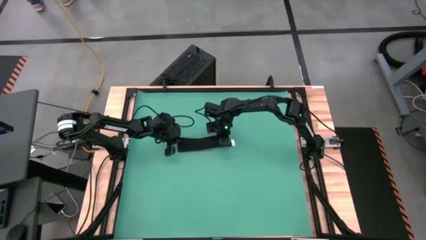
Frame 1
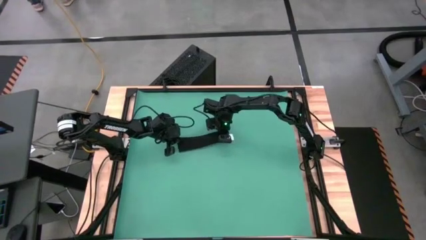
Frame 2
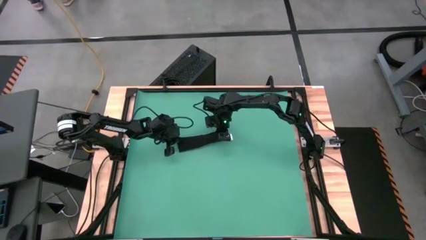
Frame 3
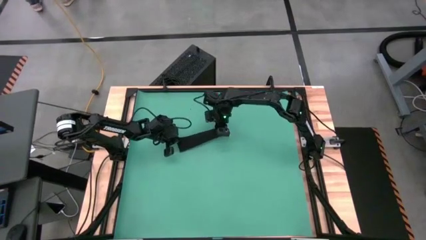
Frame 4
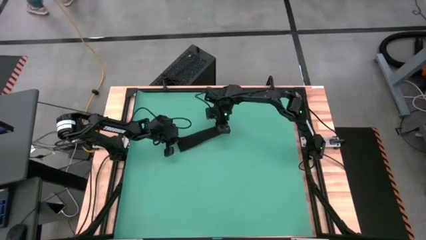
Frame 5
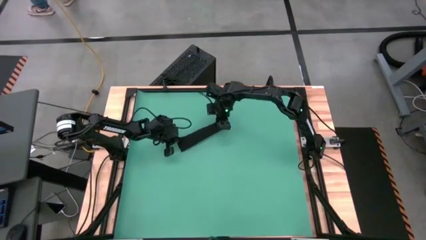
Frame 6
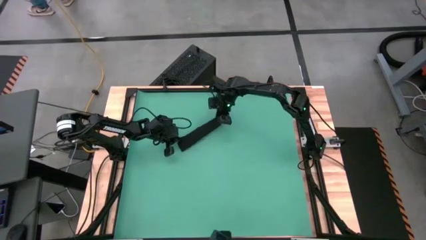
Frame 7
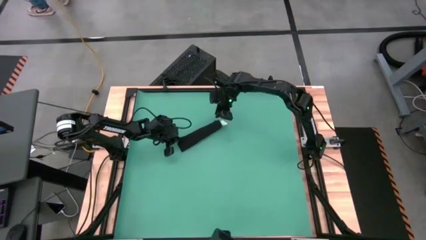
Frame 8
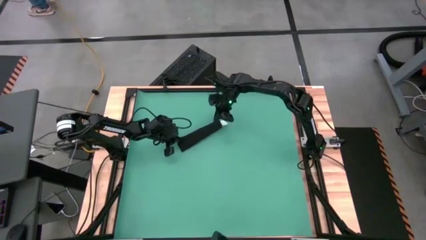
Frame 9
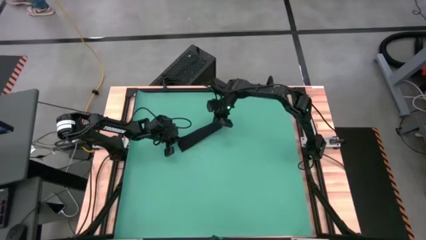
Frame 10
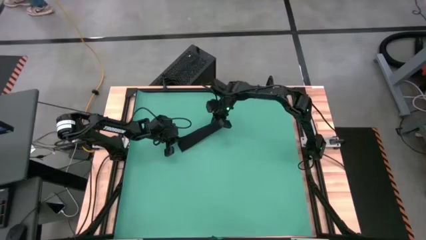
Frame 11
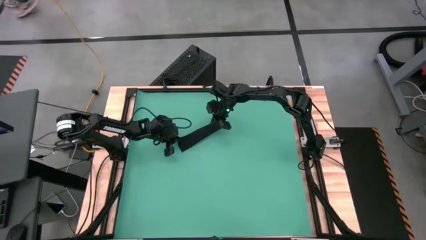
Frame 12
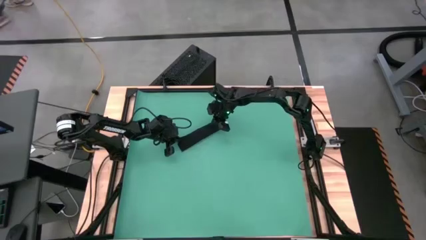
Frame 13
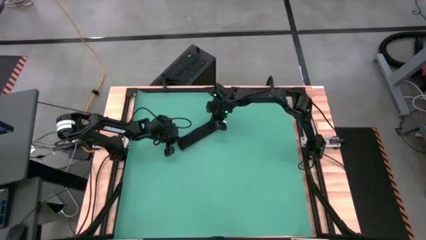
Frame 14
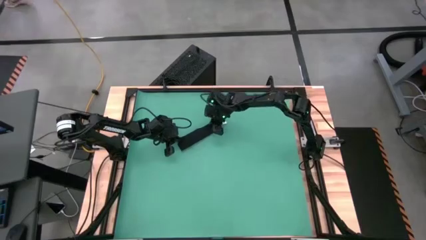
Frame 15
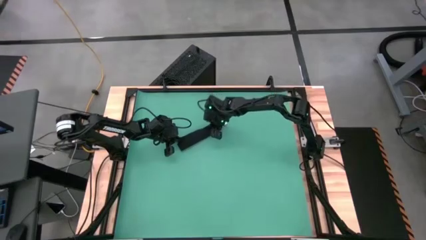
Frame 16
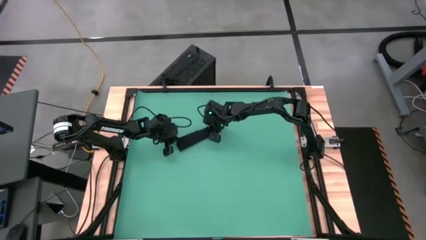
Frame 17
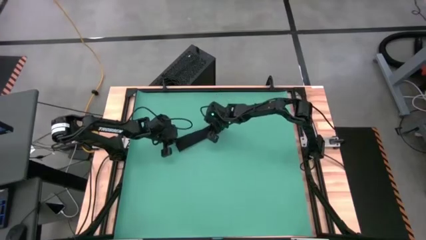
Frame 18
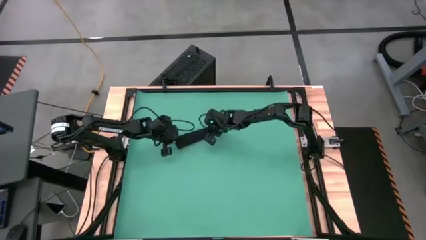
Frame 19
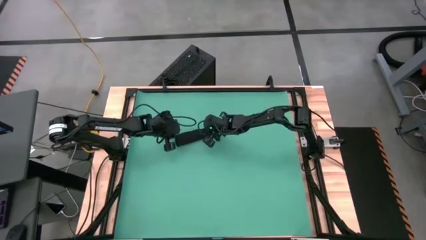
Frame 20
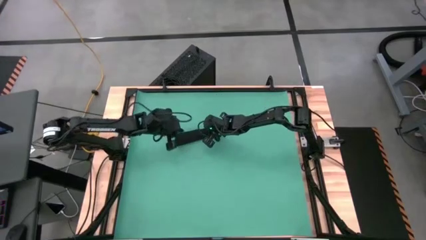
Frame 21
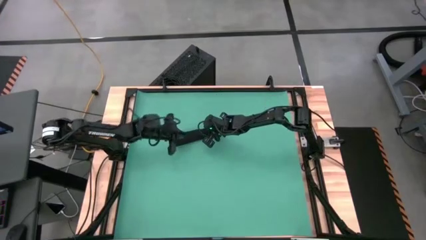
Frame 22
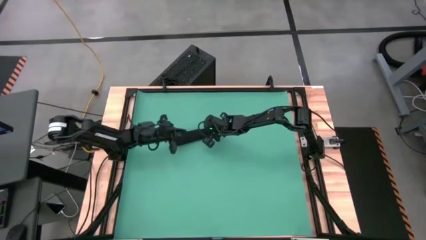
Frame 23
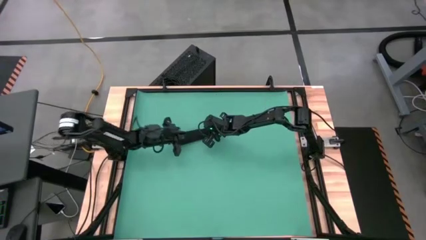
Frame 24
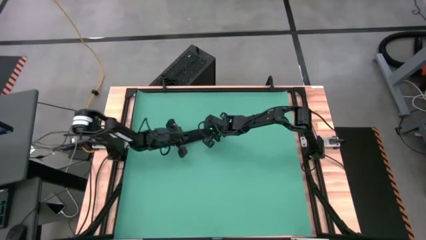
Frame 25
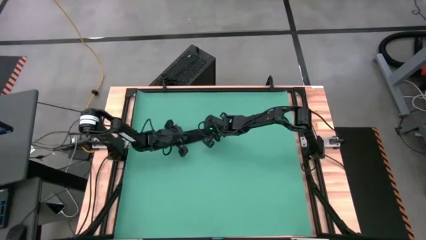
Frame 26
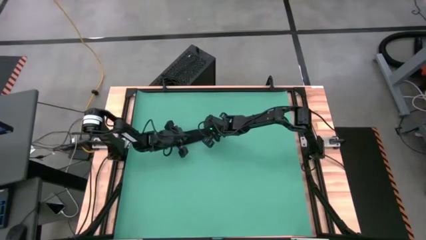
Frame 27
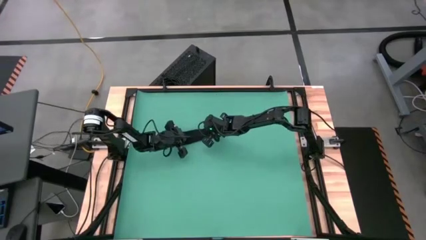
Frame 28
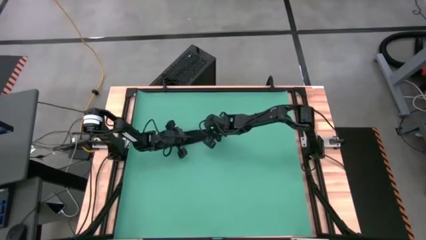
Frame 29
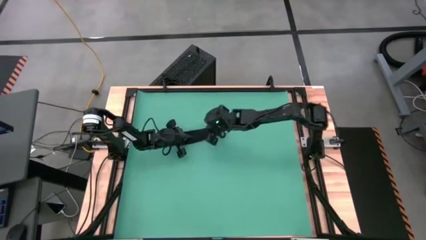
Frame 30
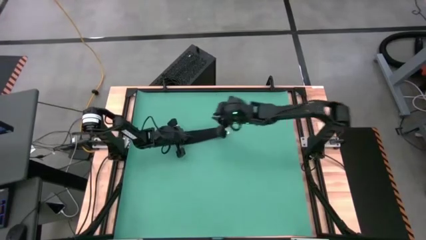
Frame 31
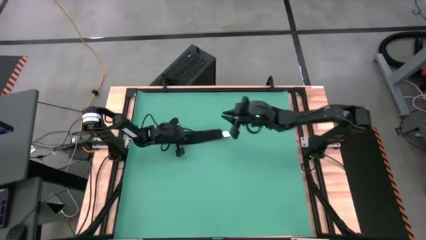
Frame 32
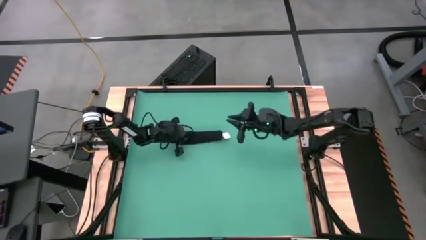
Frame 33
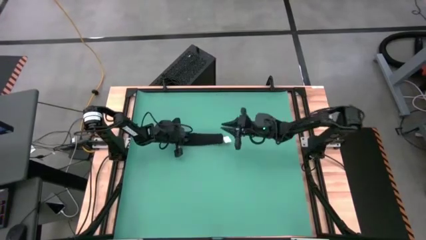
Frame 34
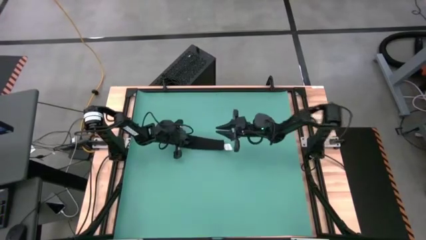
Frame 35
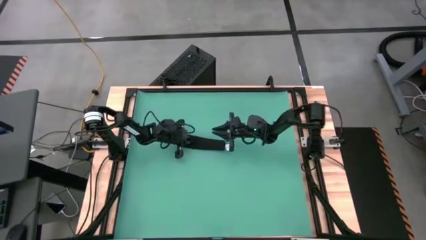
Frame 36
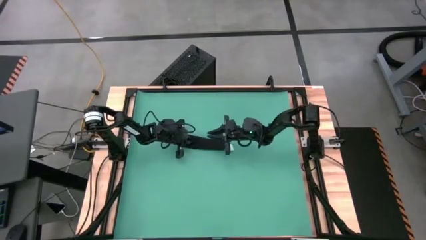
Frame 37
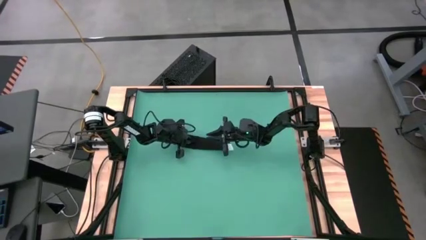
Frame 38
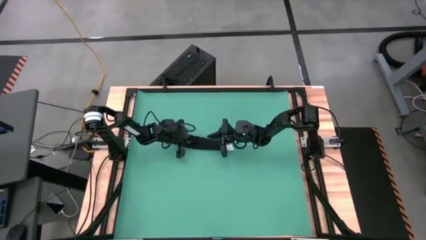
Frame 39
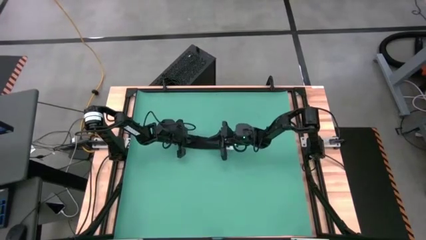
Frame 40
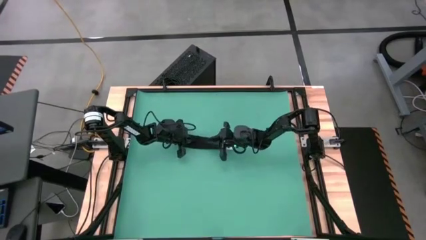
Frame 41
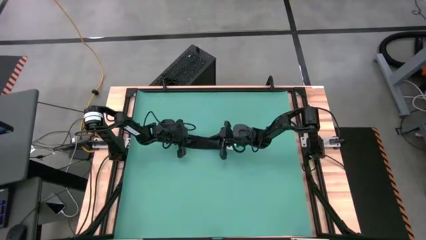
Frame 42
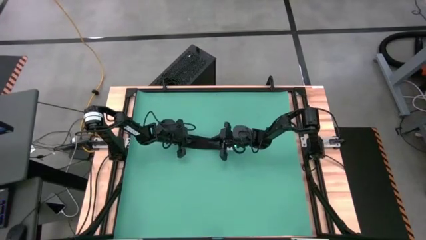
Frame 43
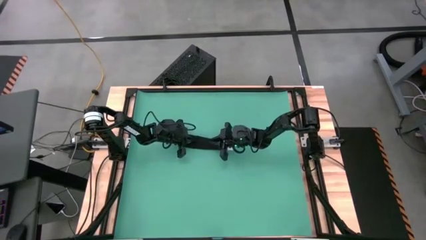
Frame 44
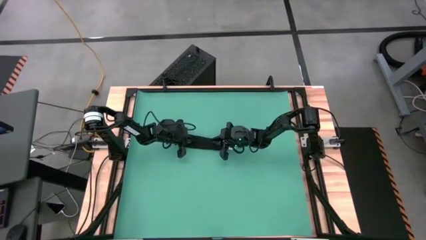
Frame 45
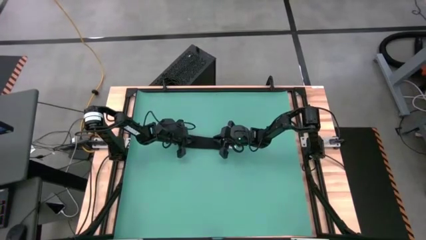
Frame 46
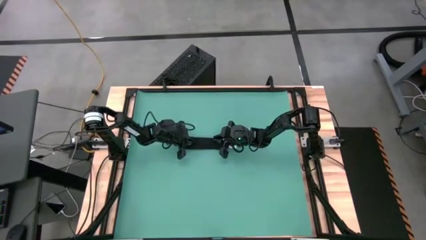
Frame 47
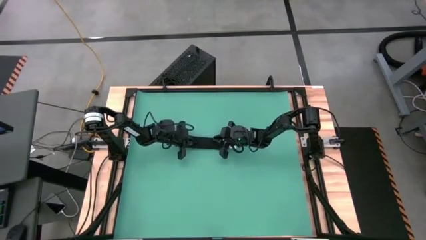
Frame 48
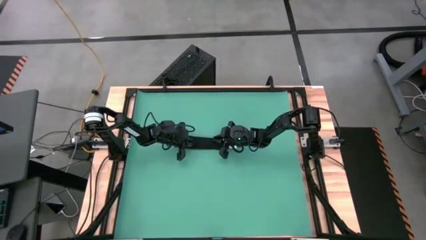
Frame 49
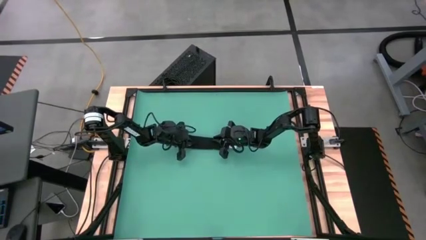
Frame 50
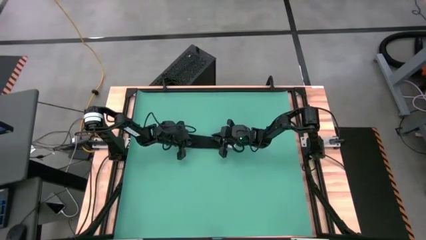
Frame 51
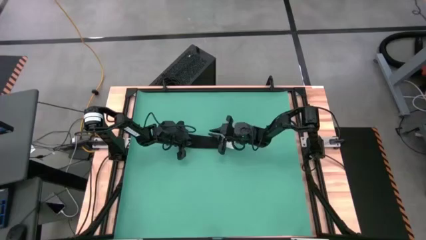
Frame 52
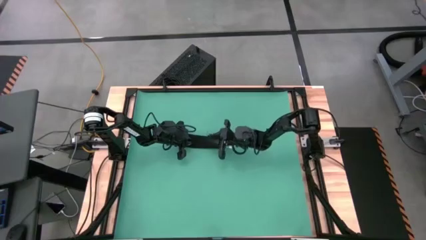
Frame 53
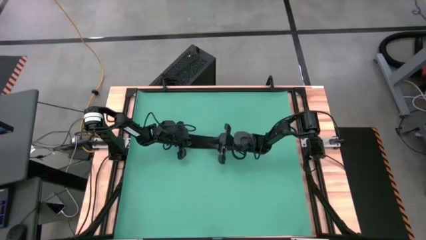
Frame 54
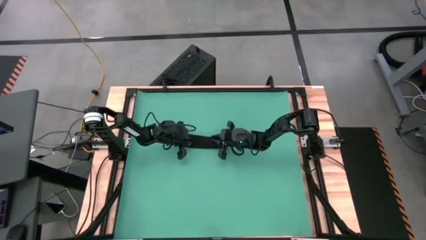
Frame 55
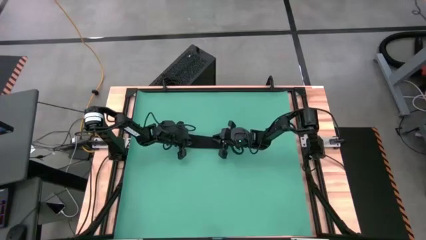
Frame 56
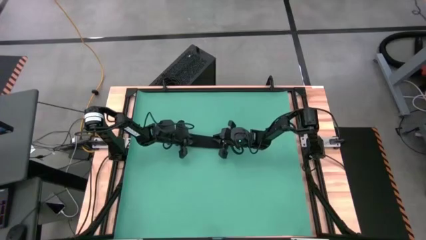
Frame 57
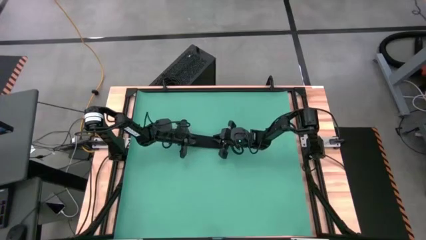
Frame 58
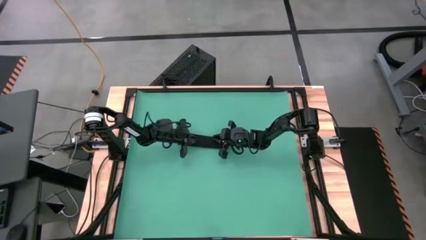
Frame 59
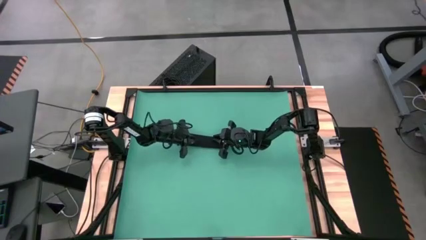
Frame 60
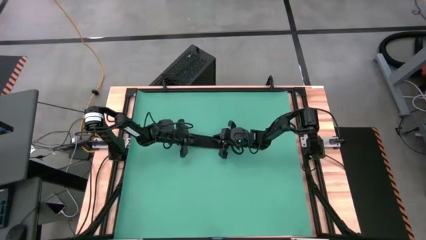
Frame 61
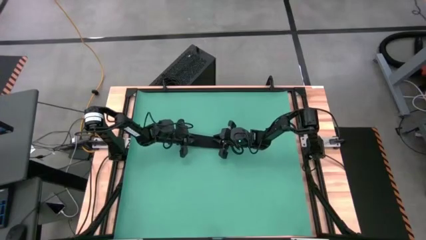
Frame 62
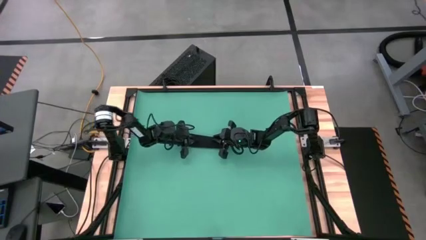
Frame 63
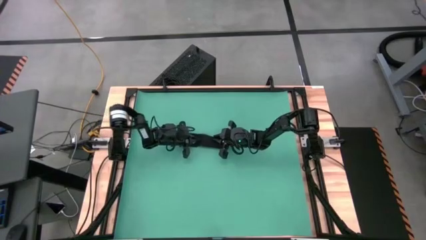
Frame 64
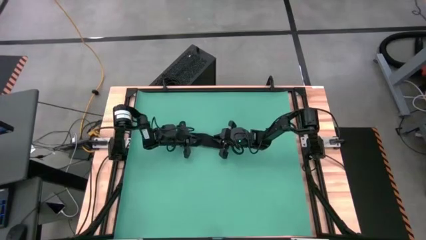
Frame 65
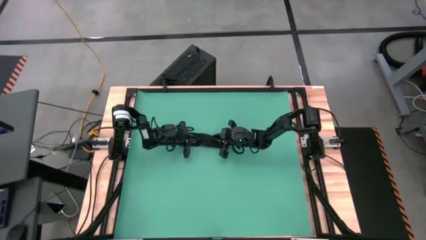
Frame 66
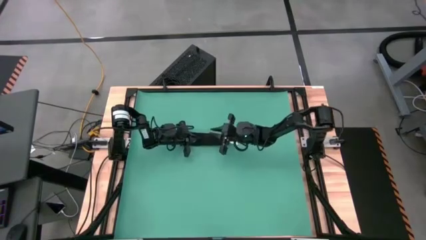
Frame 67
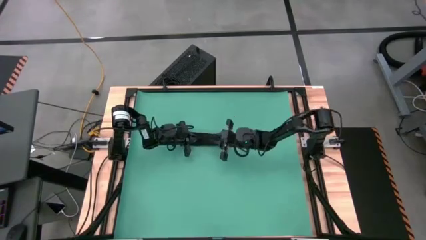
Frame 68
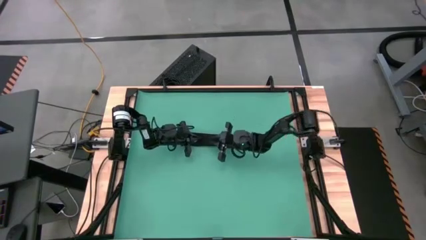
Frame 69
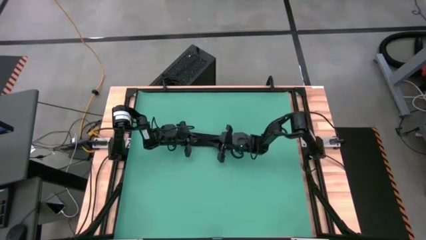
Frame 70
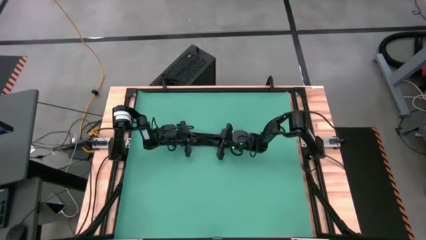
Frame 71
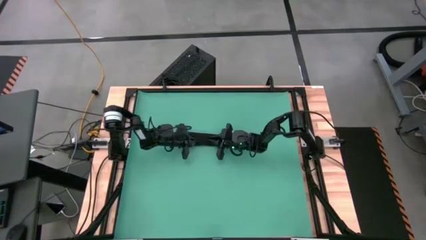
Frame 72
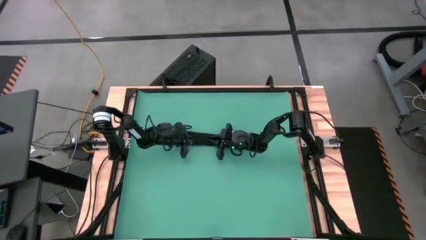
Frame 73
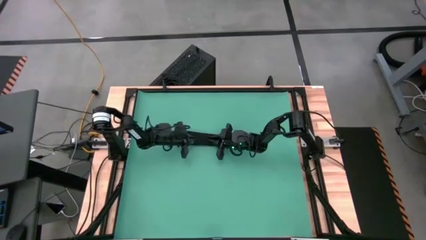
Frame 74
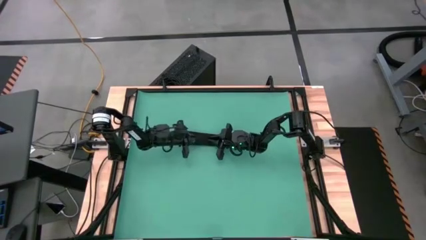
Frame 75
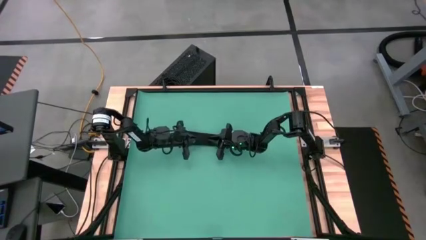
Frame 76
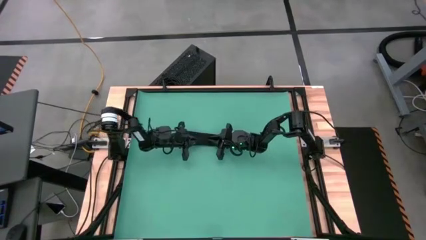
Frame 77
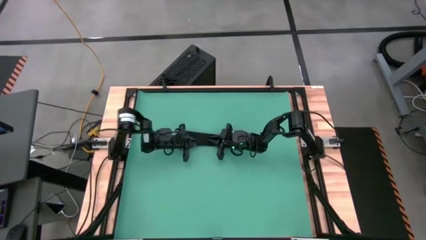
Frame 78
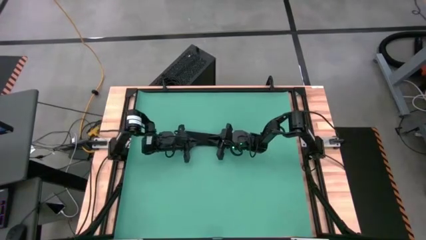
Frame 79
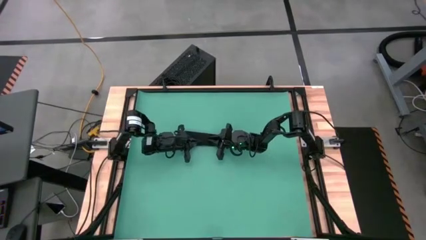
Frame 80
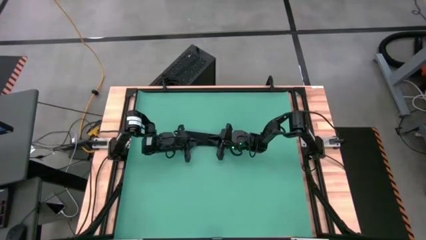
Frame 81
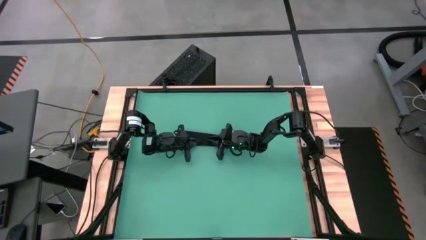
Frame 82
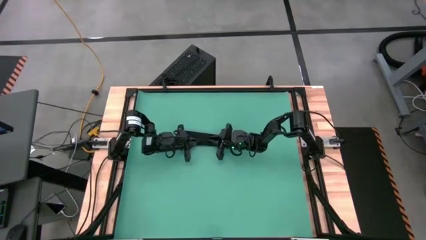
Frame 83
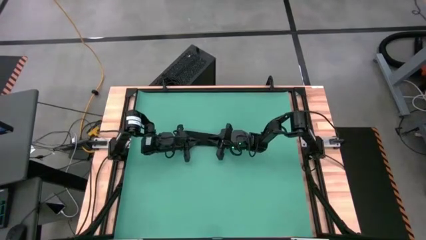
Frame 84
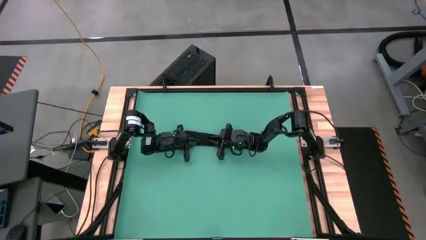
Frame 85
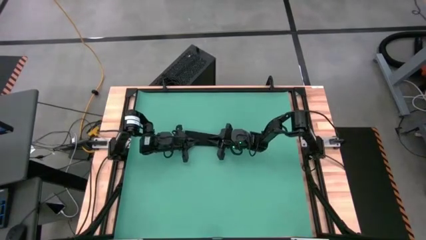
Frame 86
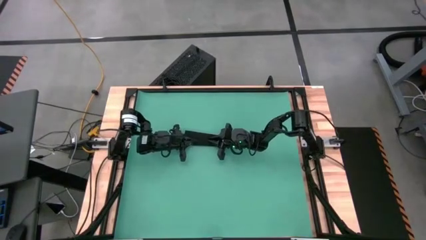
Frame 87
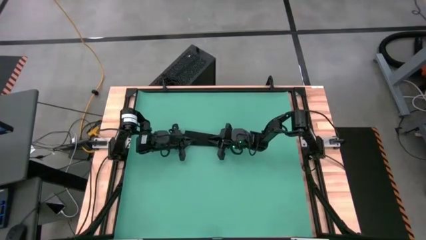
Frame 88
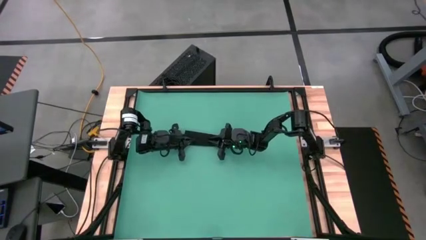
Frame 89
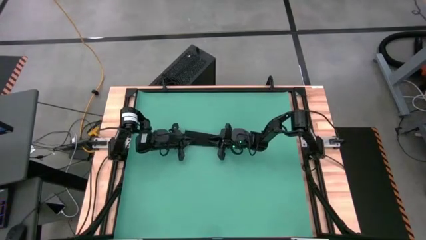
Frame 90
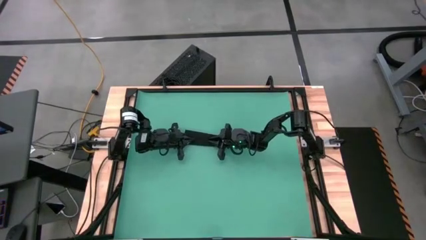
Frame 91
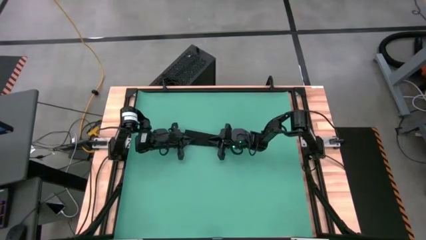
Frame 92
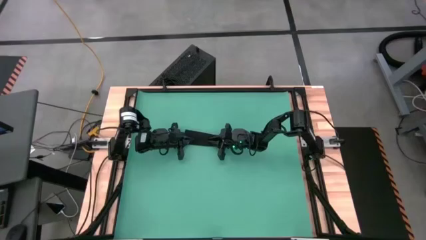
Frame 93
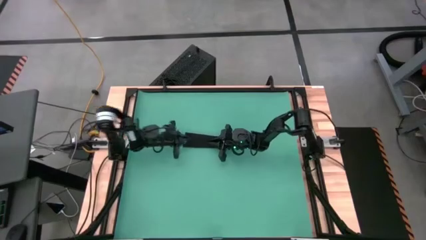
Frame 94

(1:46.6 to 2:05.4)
Task: Roll napkin
Roll the black table napkin
